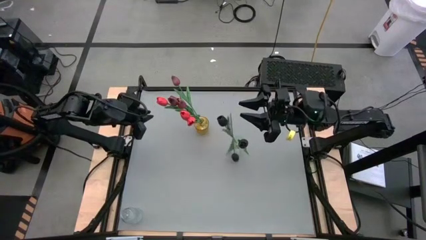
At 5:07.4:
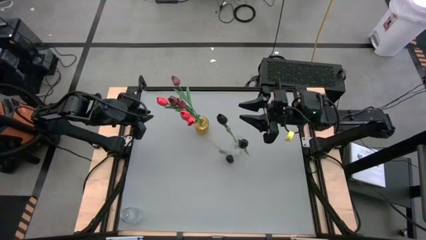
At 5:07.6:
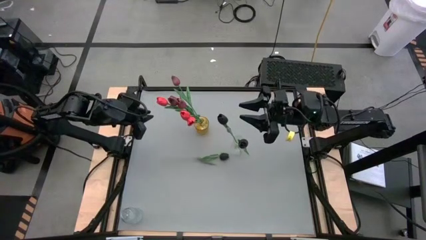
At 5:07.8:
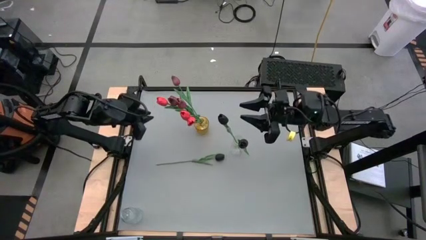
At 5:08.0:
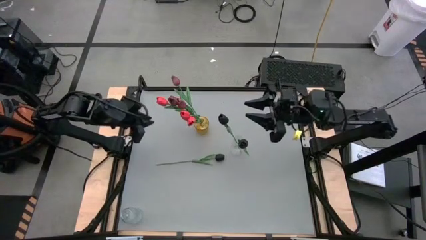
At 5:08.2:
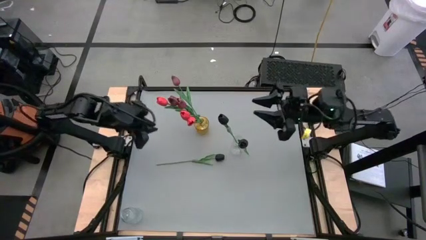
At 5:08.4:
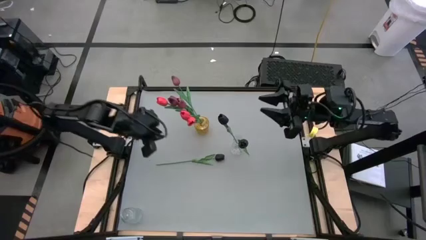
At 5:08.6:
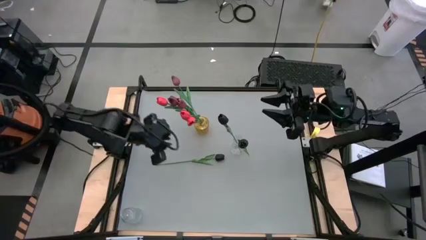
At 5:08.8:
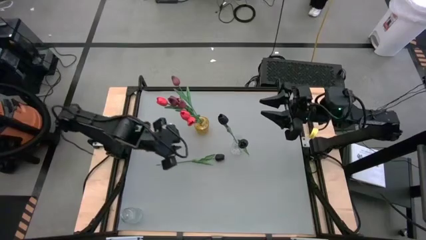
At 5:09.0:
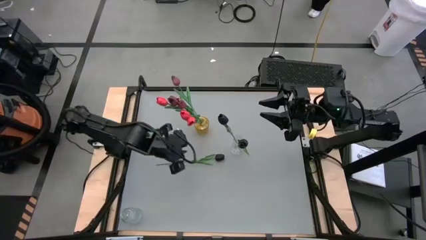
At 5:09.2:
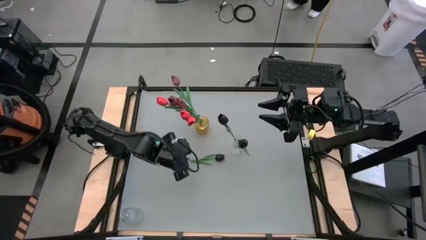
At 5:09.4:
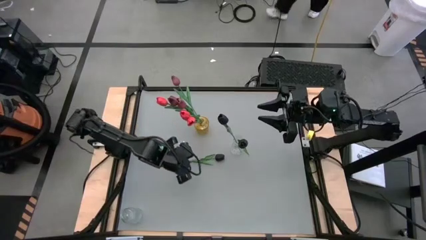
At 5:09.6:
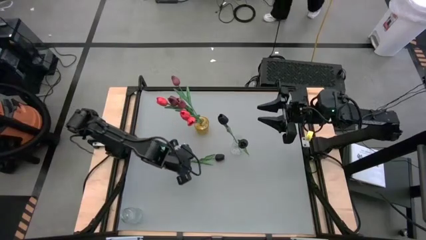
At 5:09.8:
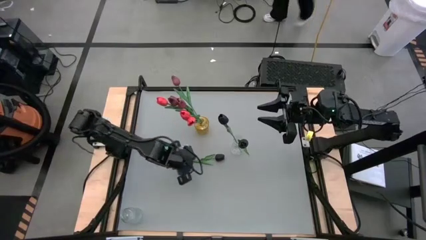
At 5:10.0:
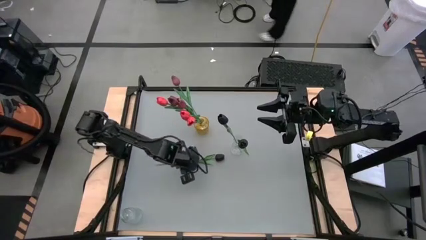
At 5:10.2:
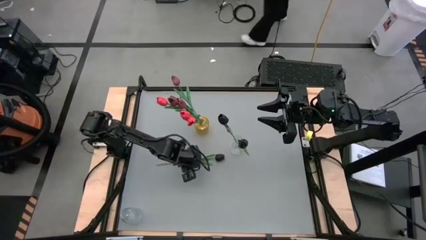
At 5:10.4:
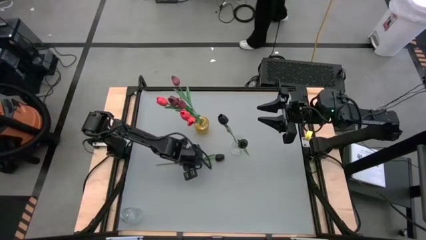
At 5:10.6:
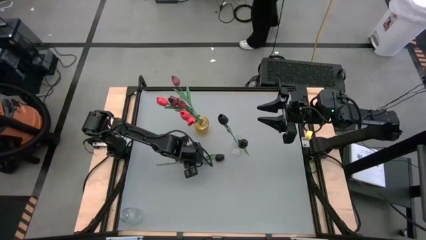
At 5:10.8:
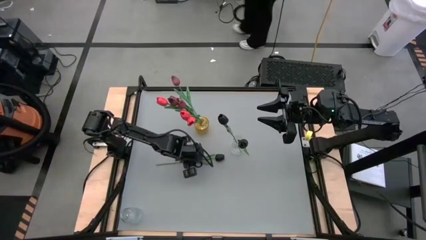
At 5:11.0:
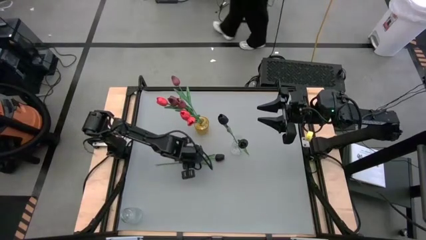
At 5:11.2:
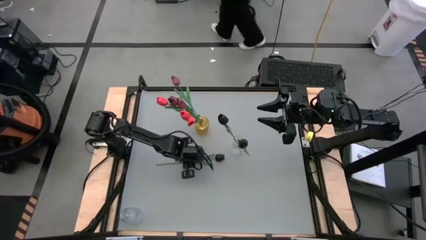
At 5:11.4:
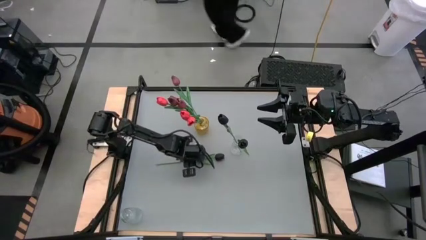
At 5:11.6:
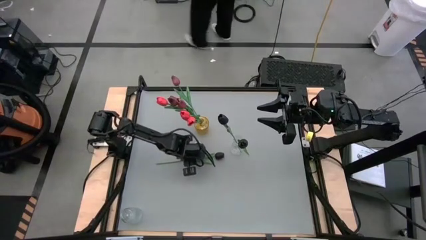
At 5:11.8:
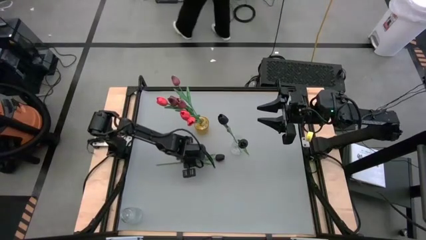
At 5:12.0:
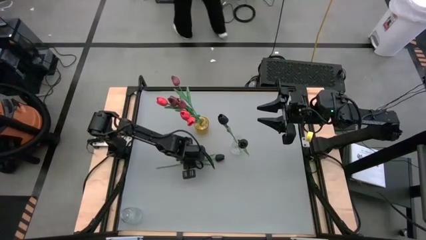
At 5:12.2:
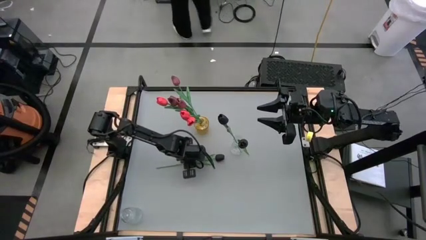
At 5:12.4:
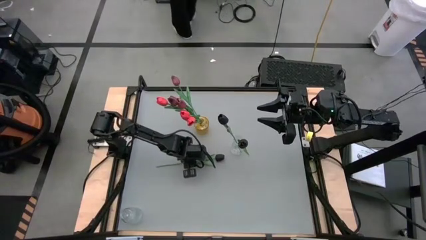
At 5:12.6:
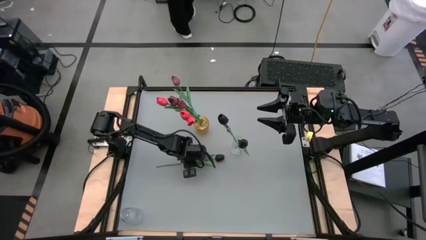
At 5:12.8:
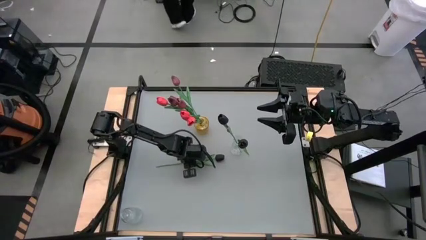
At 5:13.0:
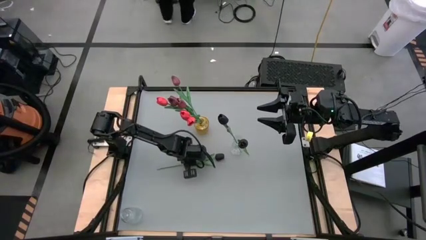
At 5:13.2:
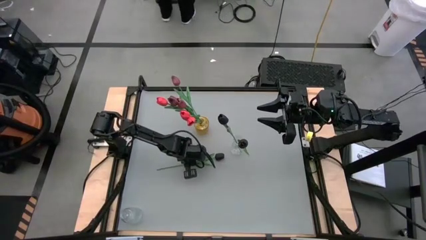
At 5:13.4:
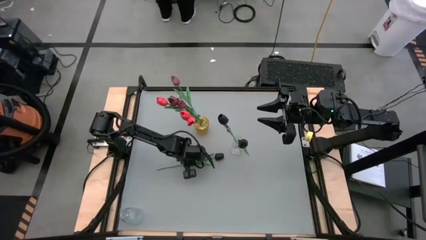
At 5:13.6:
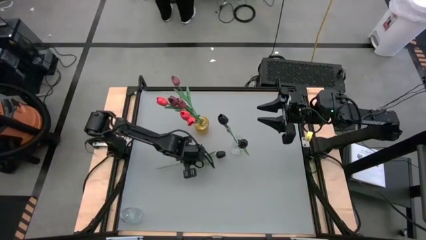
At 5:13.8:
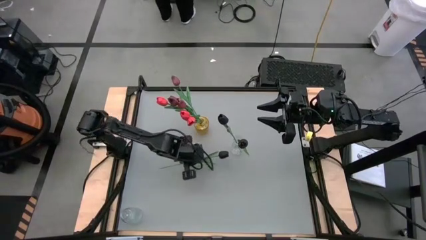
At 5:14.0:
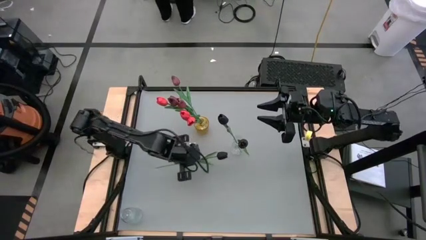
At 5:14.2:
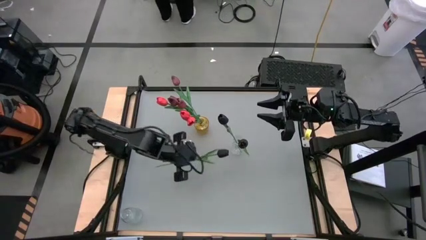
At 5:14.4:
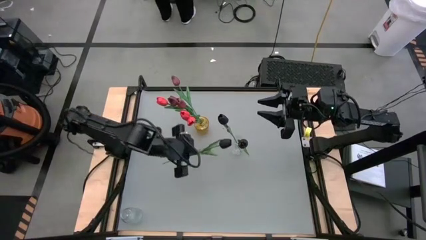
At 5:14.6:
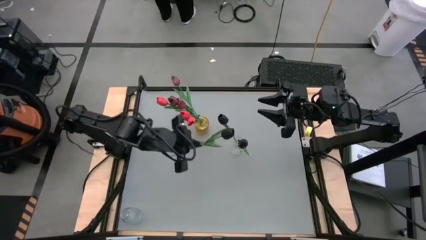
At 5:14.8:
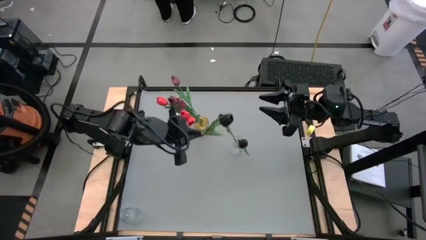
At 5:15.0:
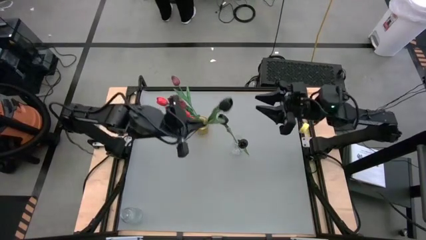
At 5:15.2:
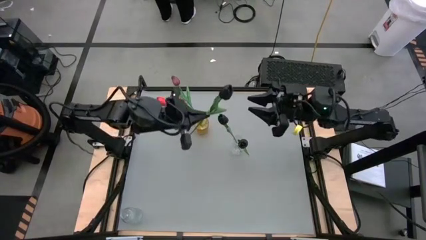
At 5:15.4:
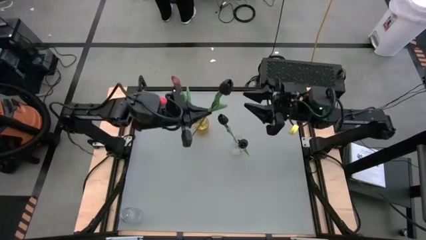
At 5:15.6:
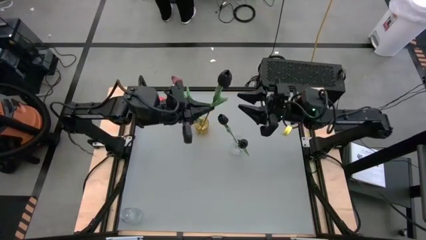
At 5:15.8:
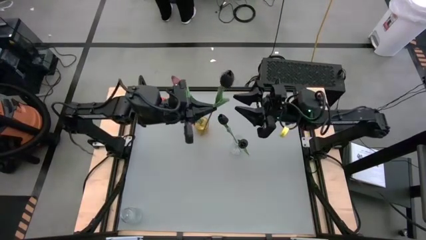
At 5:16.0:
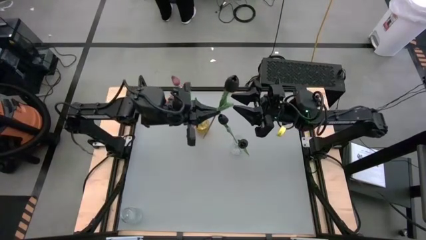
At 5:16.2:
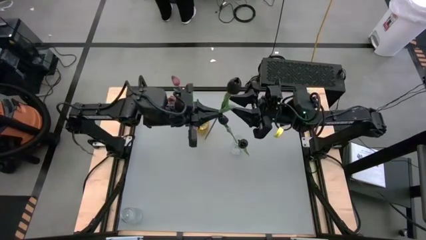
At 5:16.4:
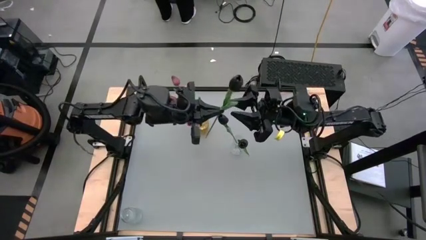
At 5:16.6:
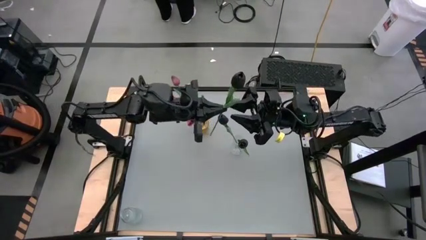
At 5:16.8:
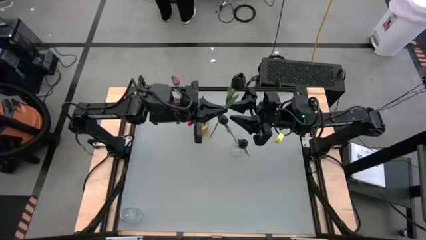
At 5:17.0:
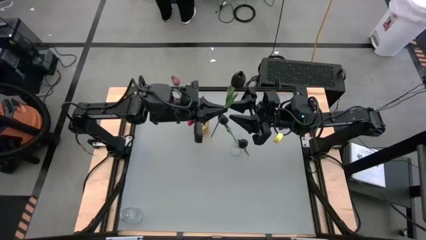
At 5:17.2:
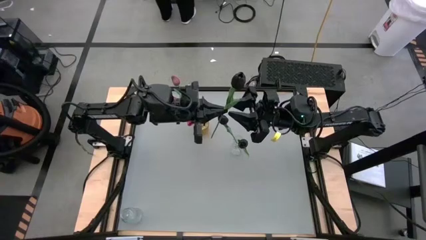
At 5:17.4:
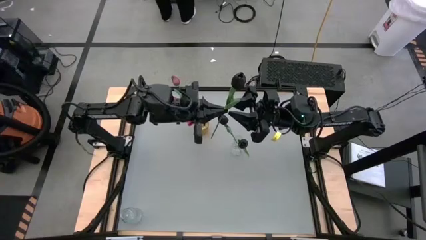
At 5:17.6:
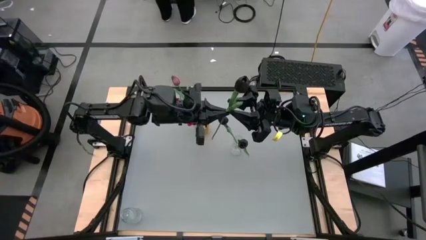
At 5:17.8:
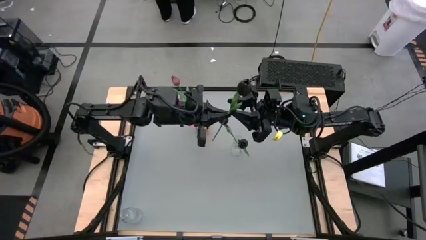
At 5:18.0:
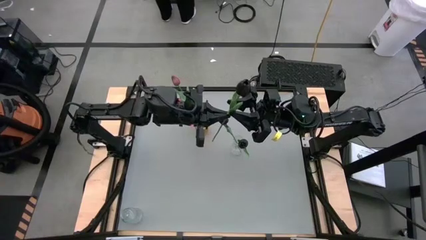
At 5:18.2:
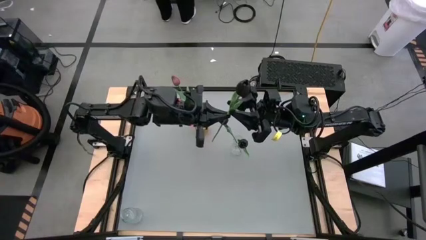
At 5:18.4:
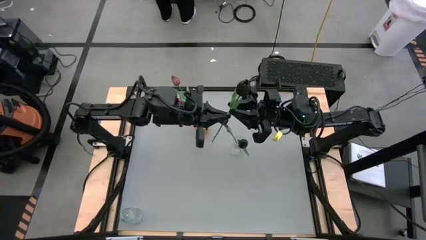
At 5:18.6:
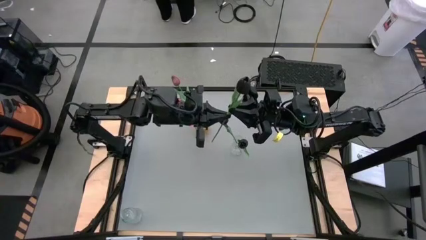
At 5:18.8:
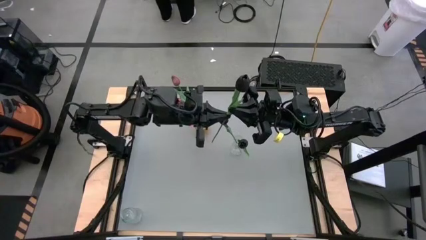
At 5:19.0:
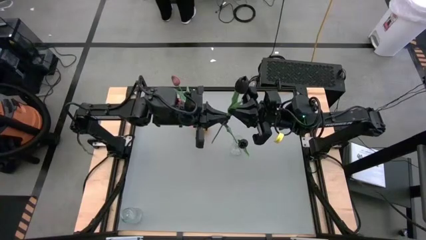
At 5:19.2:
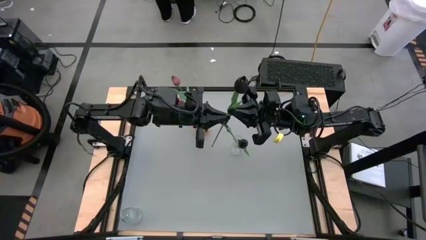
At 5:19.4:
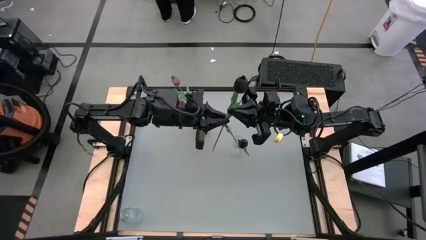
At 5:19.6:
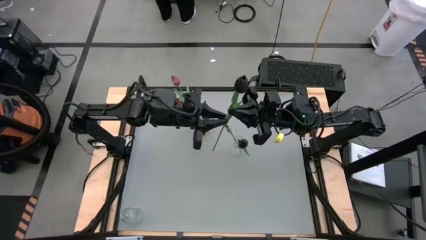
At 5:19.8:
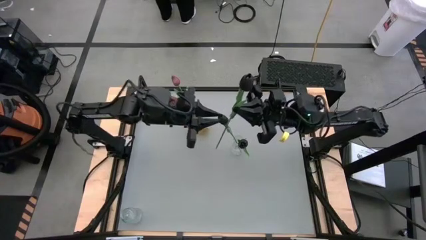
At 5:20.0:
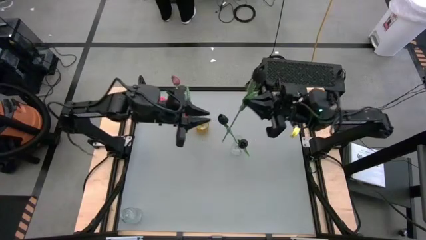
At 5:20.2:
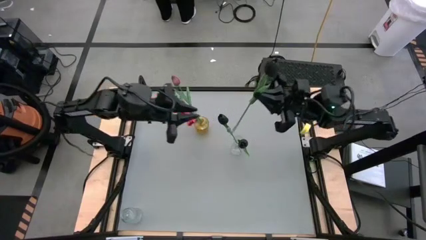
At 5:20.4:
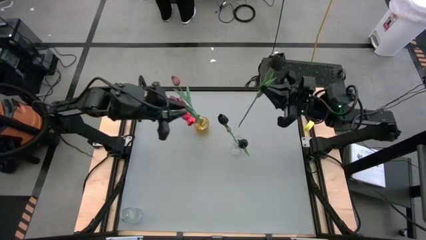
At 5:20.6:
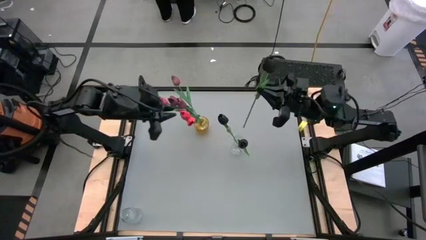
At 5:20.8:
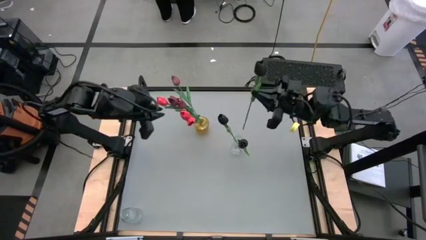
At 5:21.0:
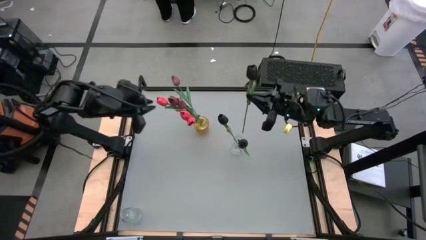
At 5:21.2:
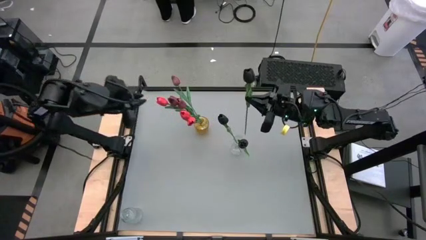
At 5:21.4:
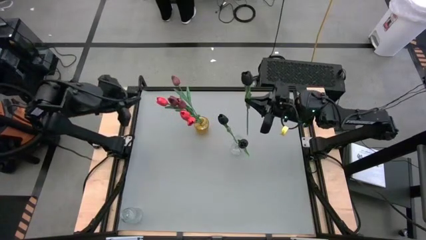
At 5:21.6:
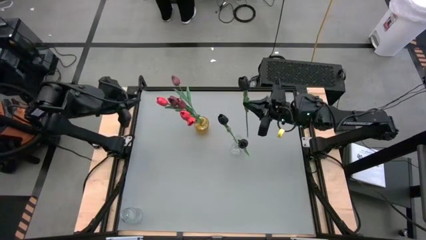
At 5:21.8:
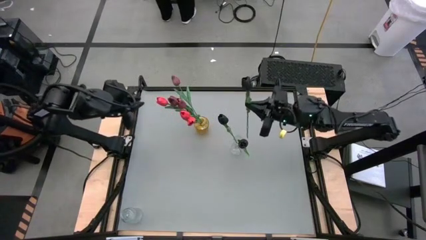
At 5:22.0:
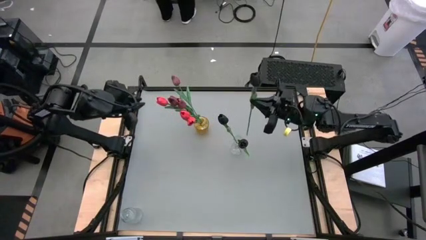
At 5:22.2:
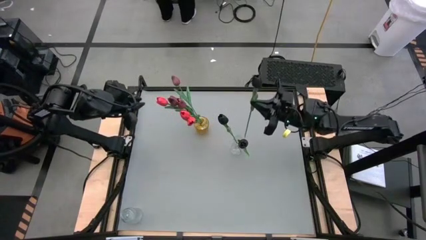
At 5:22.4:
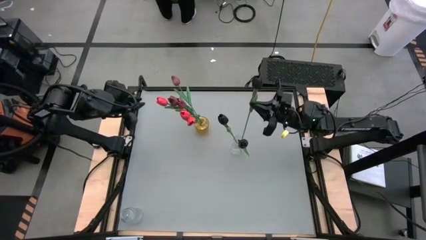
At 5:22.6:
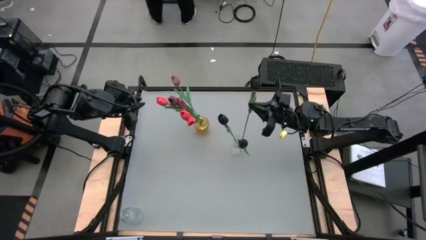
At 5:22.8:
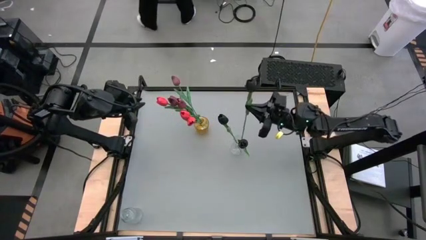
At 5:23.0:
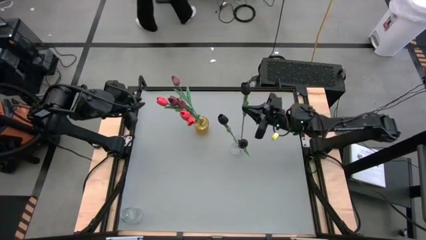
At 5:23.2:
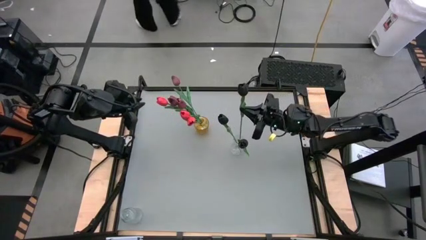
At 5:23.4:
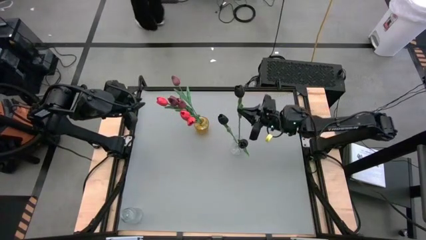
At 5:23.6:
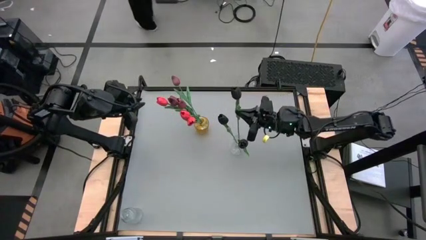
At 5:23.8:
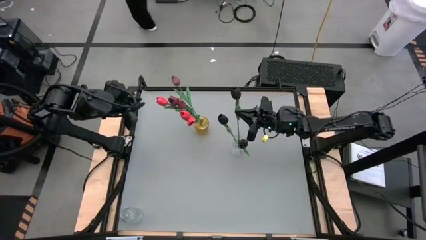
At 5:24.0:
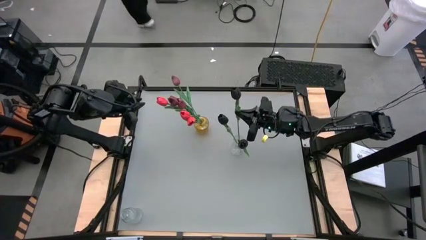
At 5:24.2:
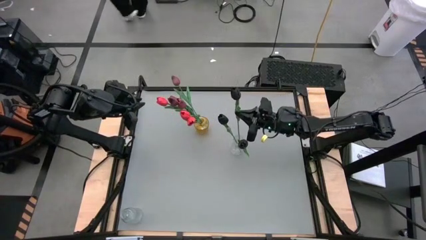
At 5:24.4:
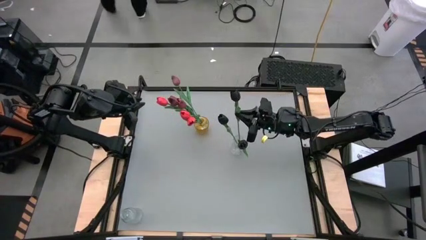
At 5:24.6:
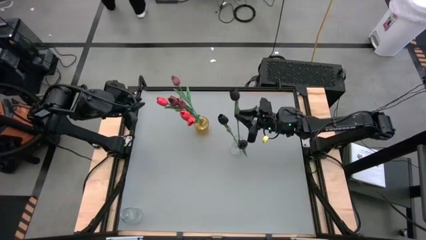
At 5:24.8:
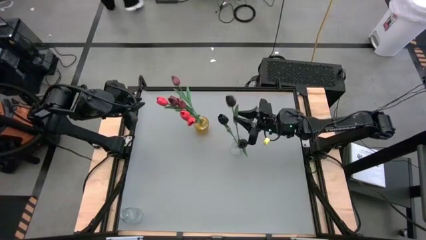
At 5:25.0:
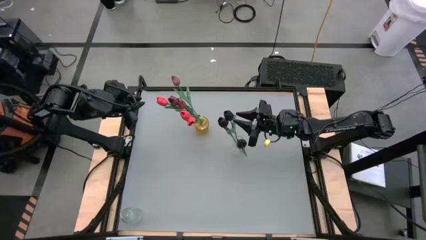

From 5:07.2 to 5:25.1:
Task: Sort flowers into vase by color
Put the black flower into the transparent vase
